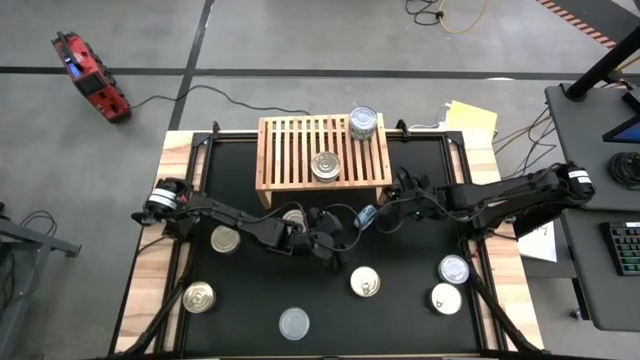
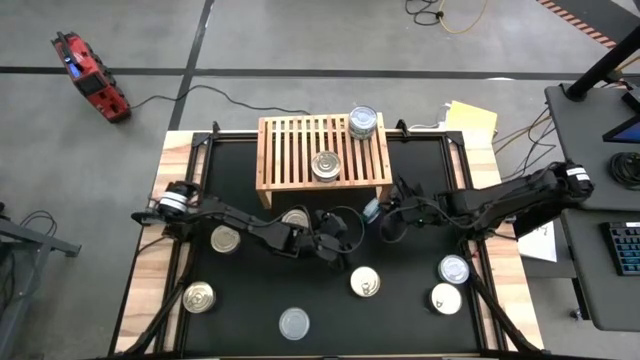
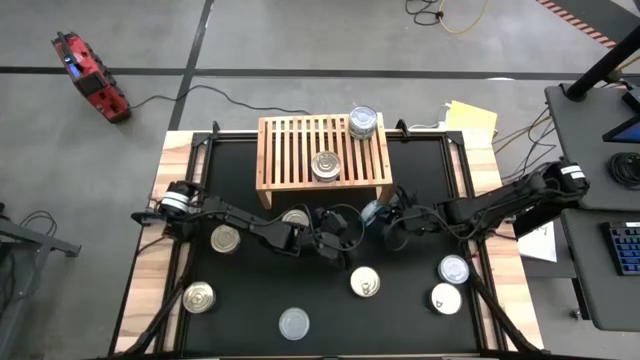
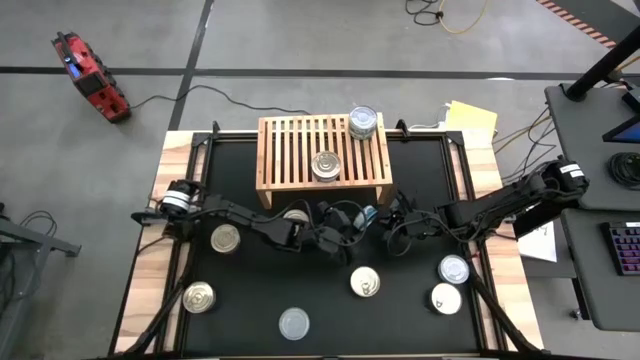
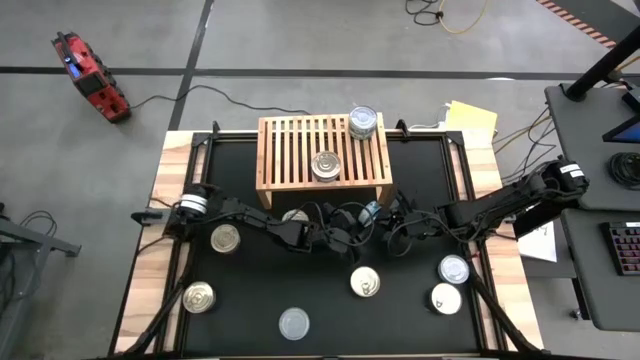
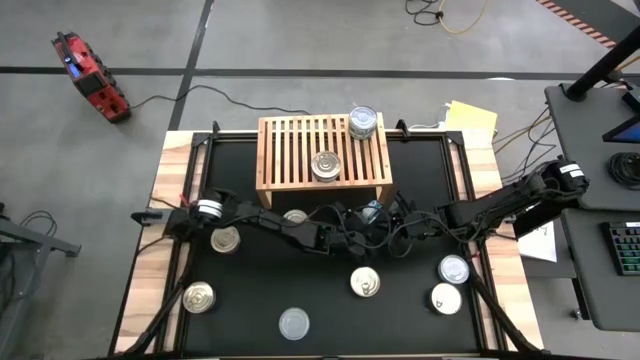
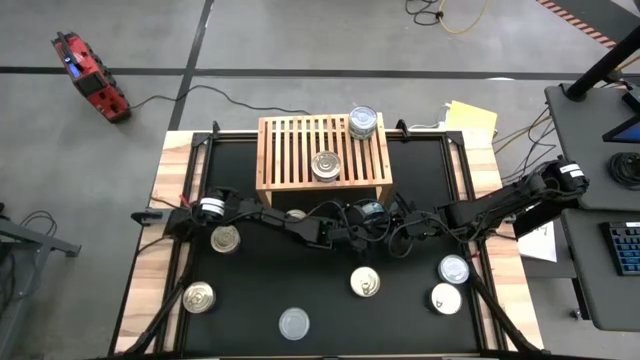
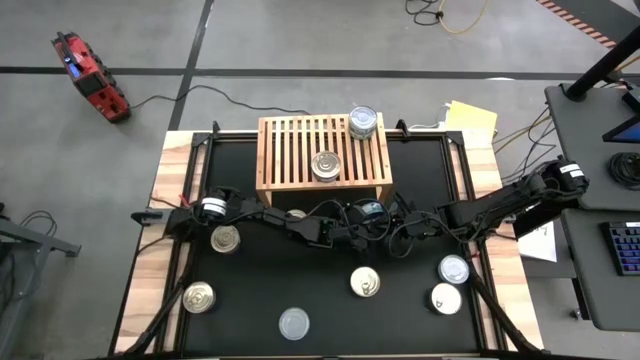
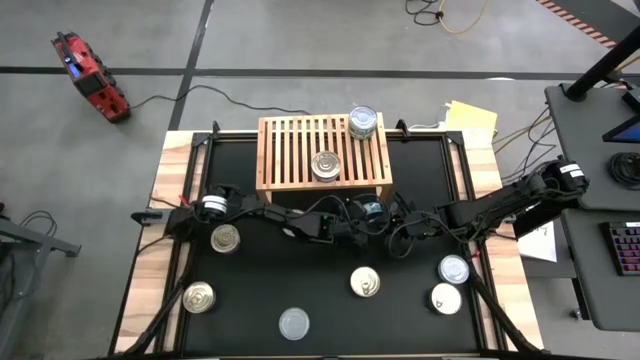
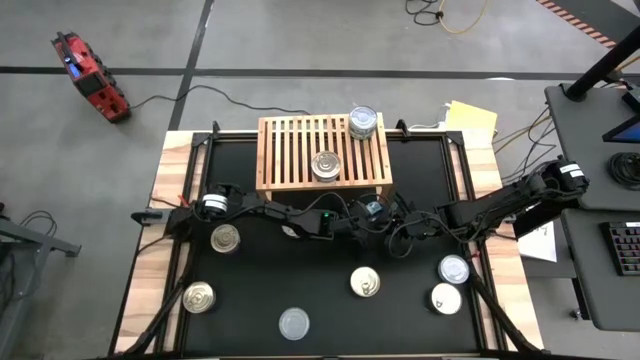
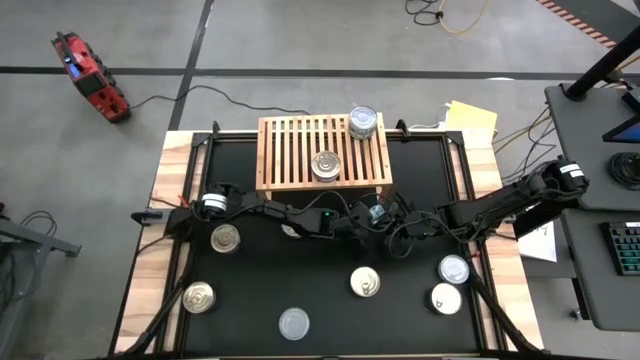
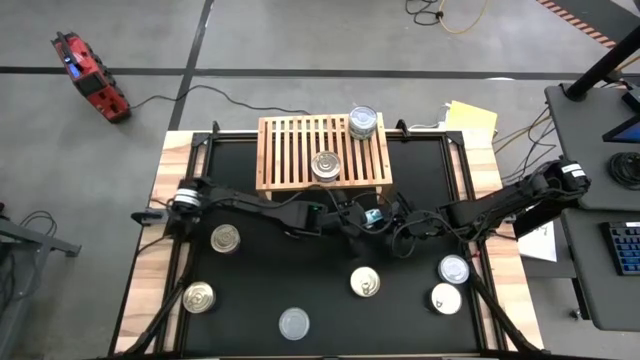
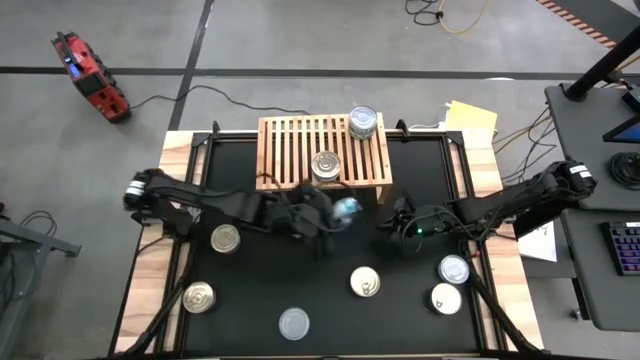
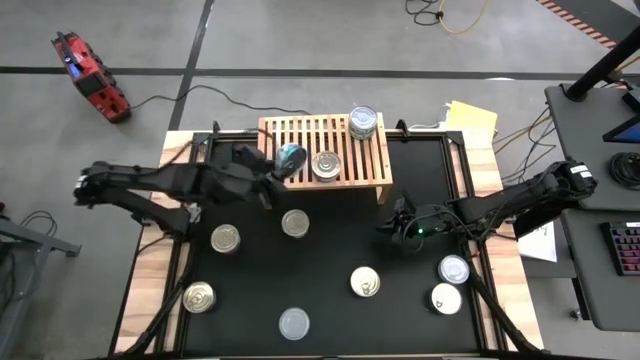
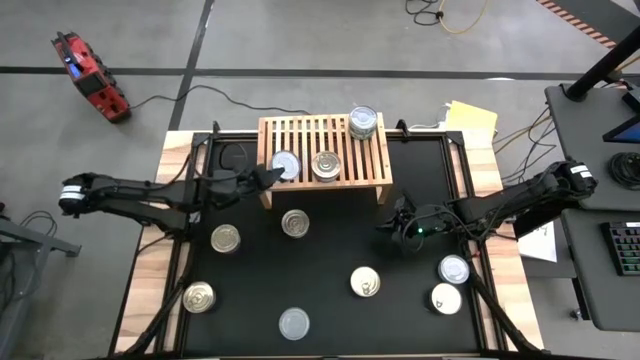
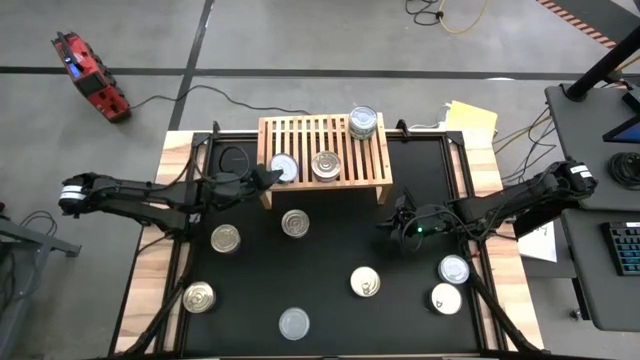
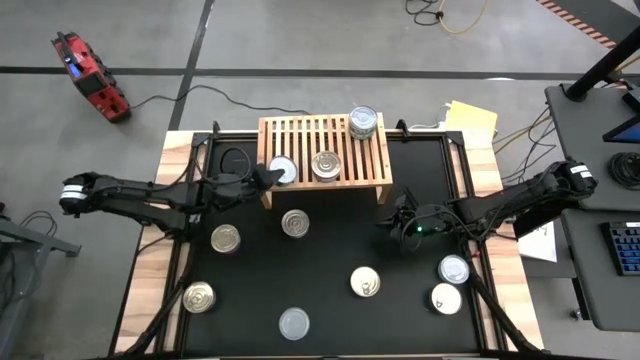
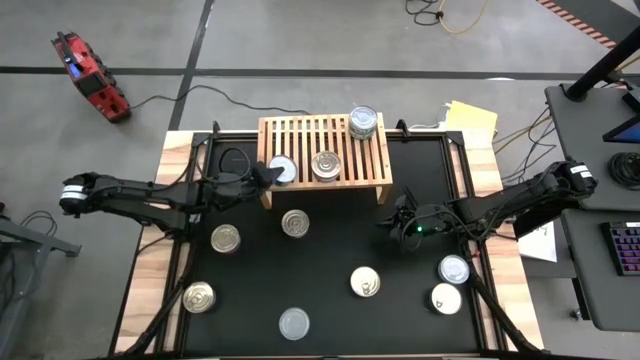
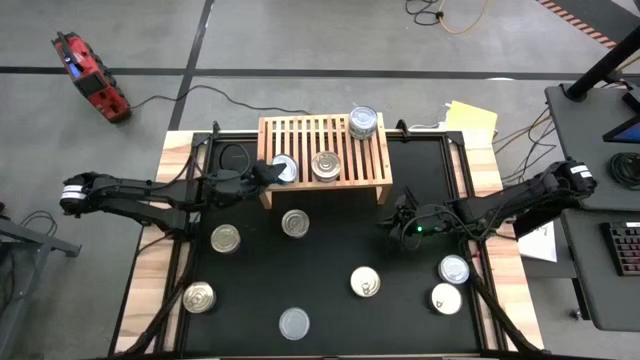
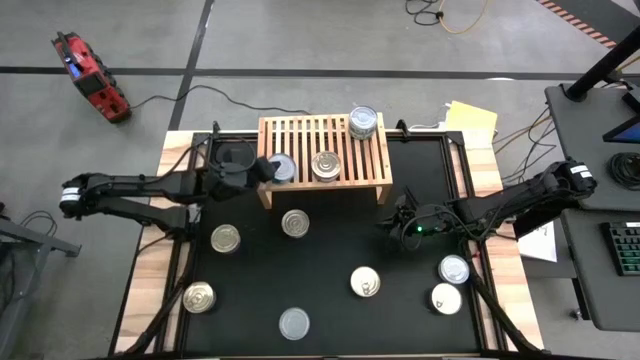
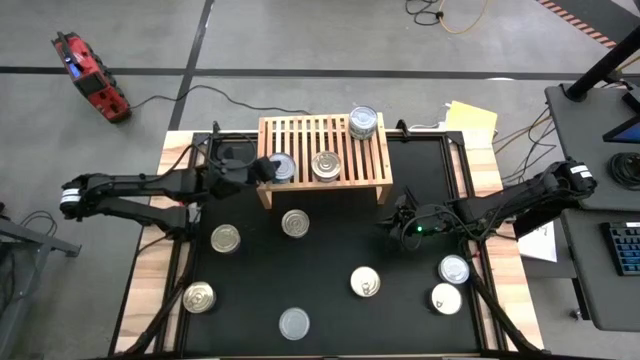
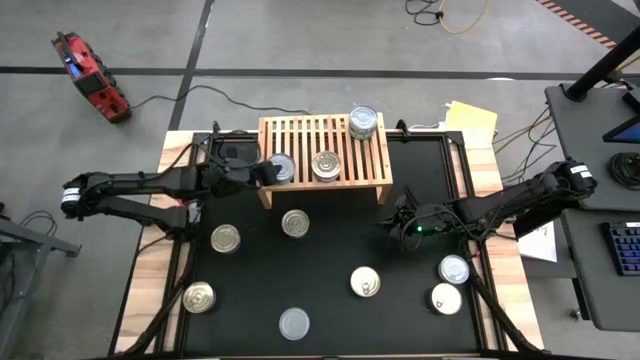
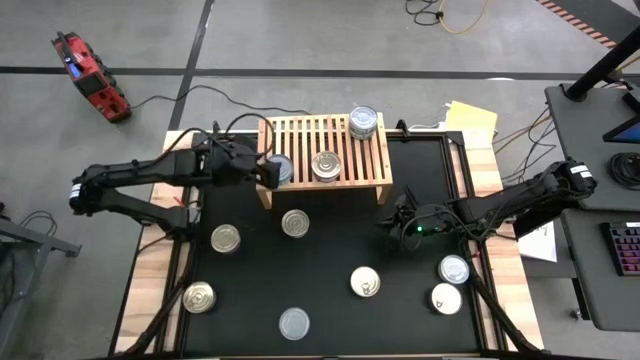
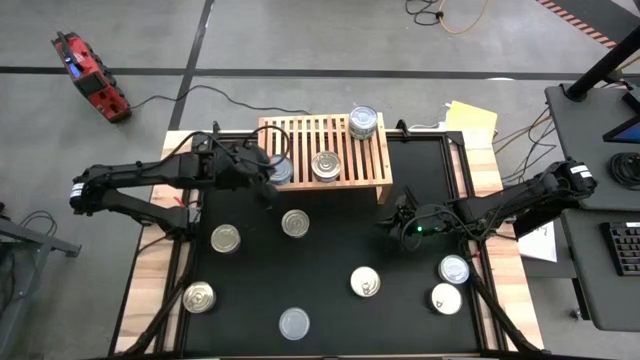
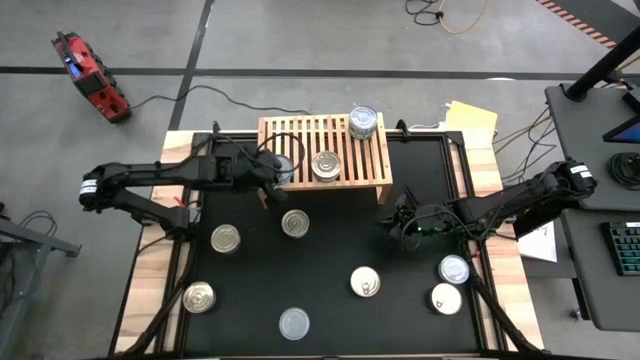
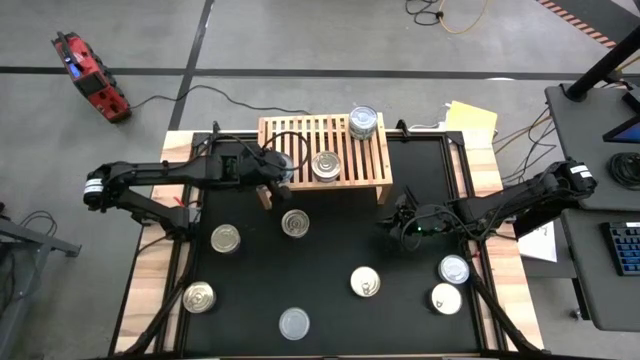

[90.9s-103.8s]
Task: Stack canned seafood by type on shelf
Put the green blue tuna can on the shelf

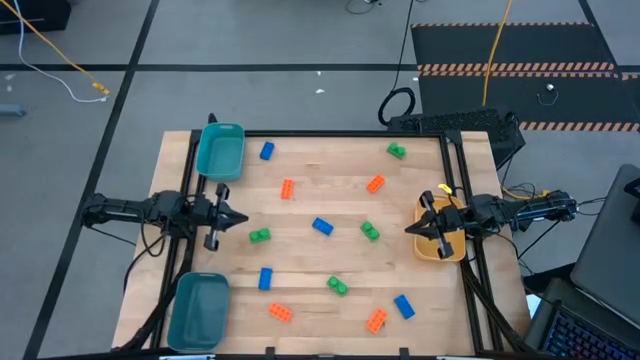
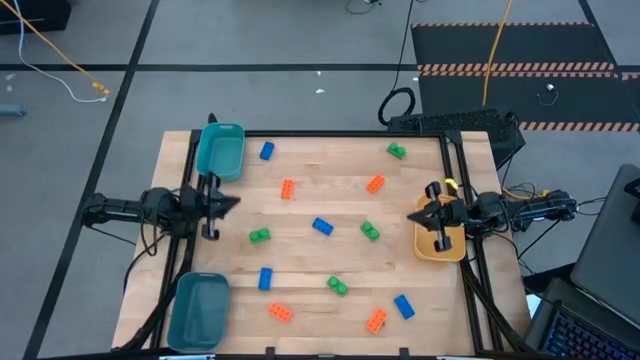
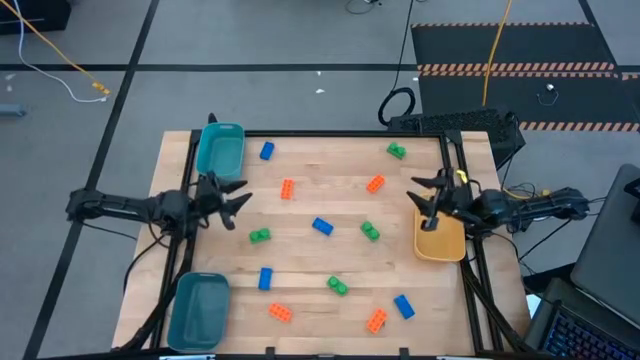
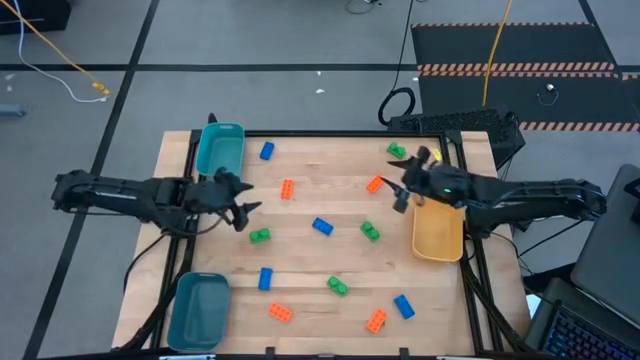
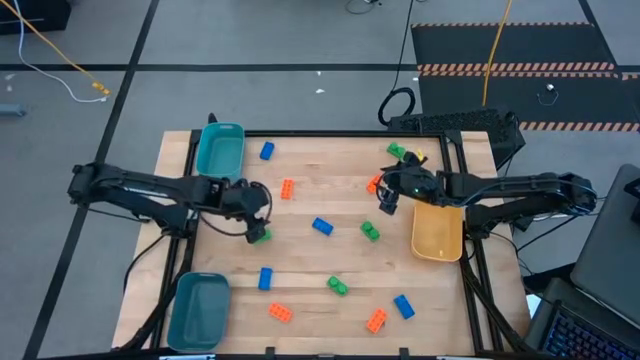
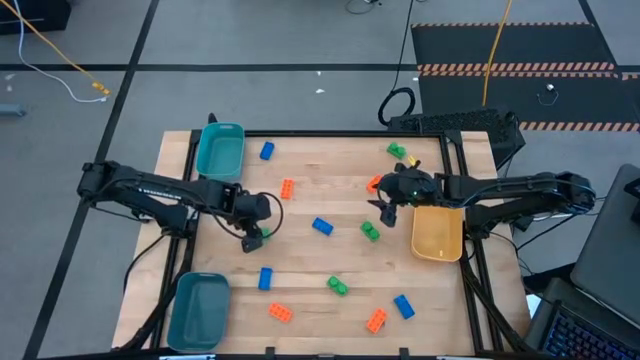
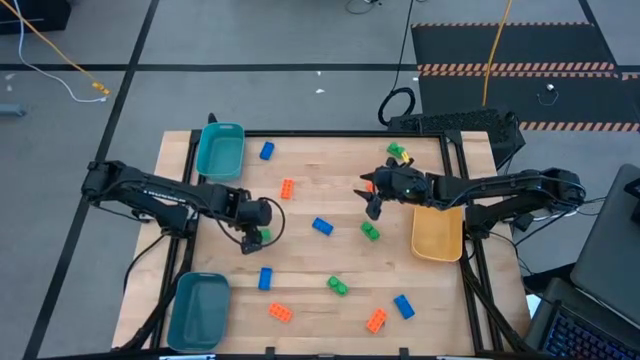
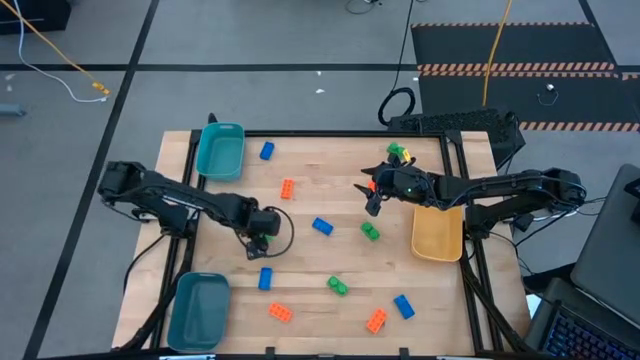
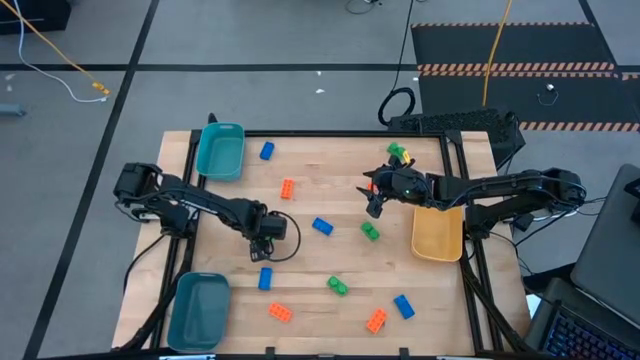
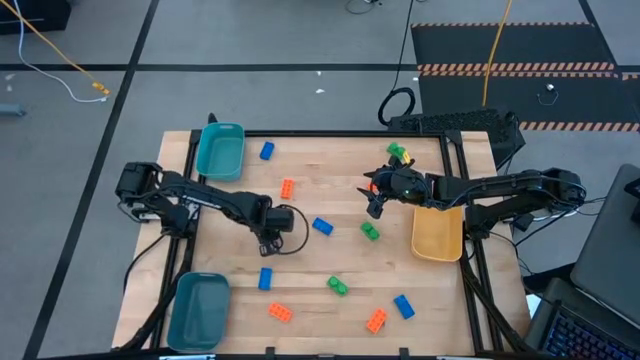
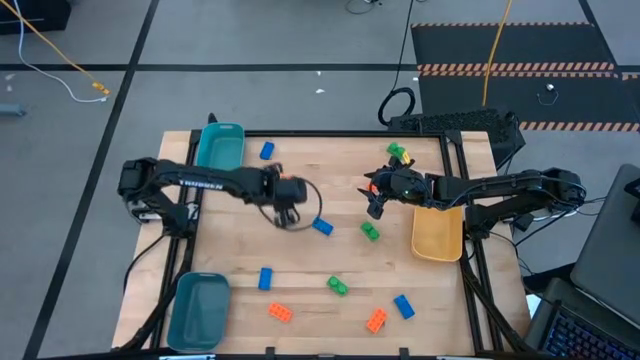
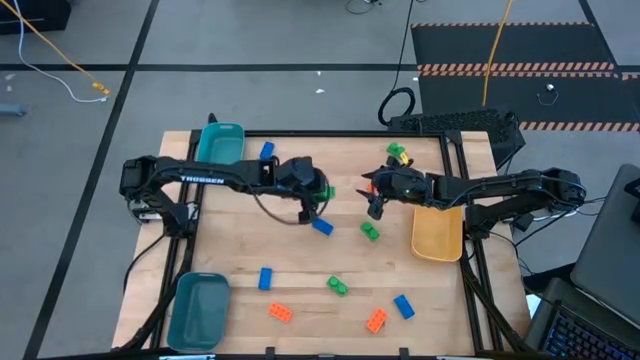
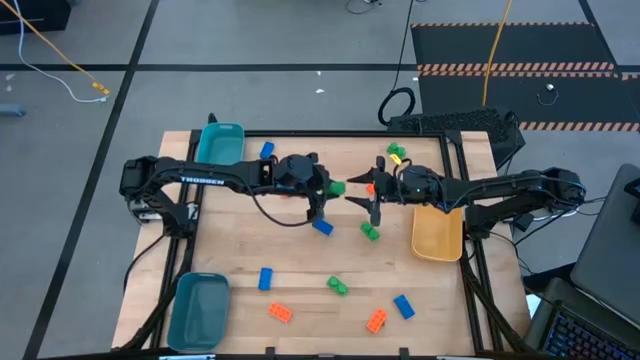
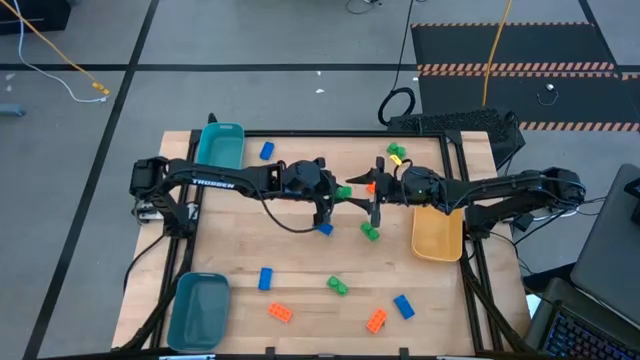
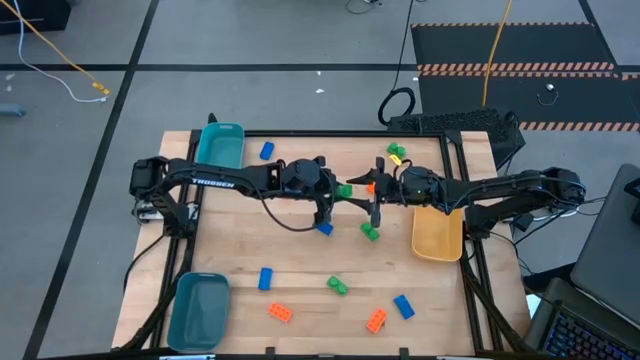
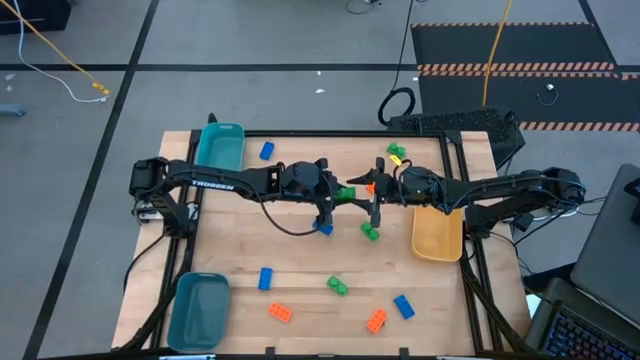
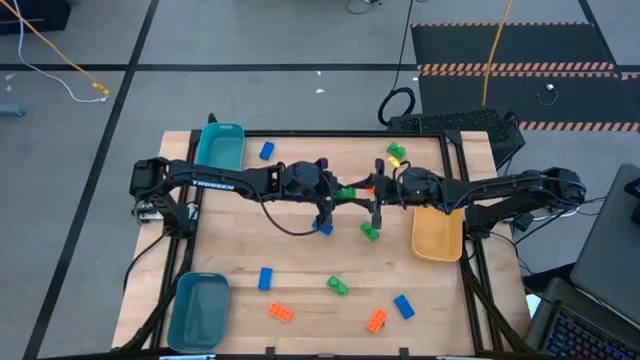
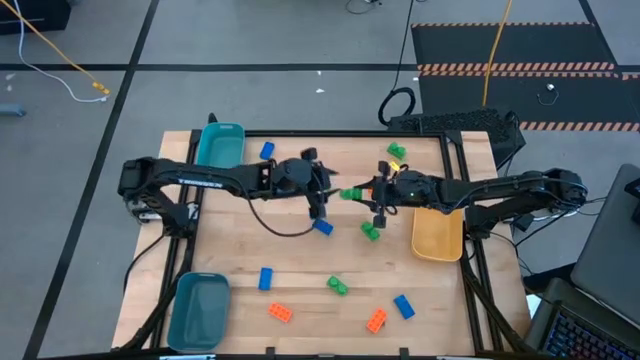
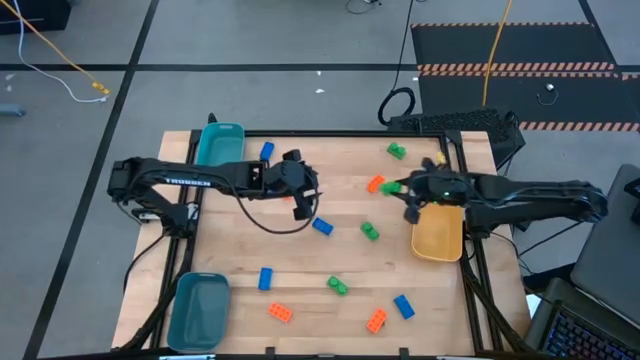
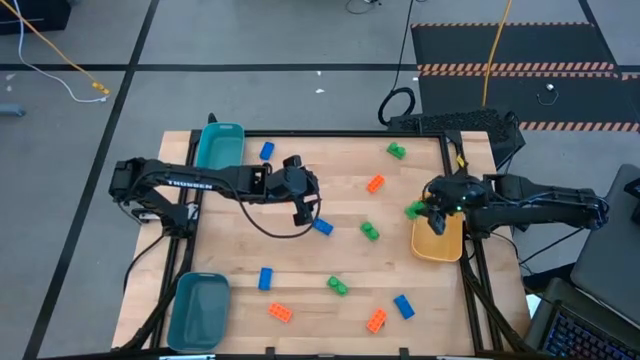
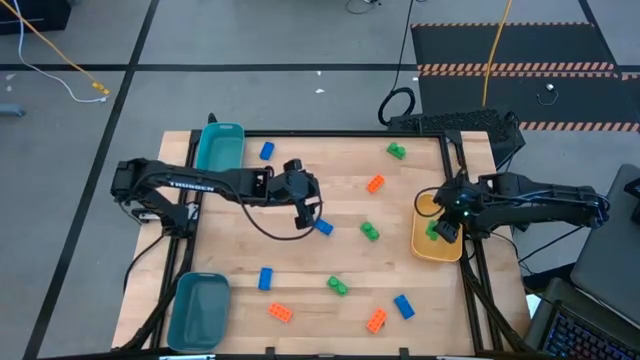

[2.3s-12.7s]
Task: Sort & place blocks by color
Put the green game piece into the yellow bin
